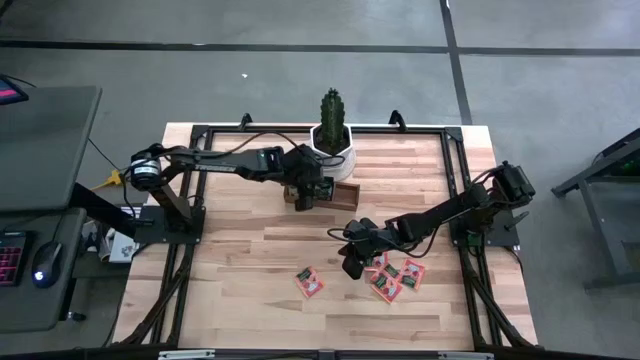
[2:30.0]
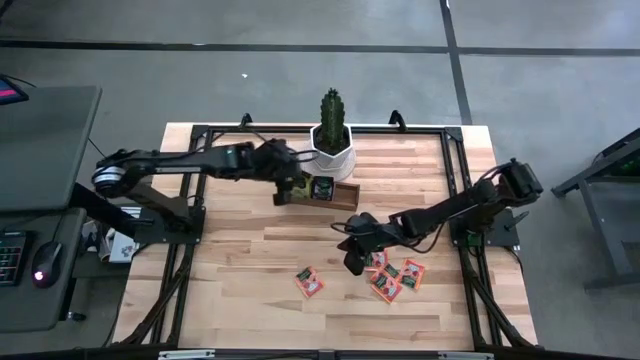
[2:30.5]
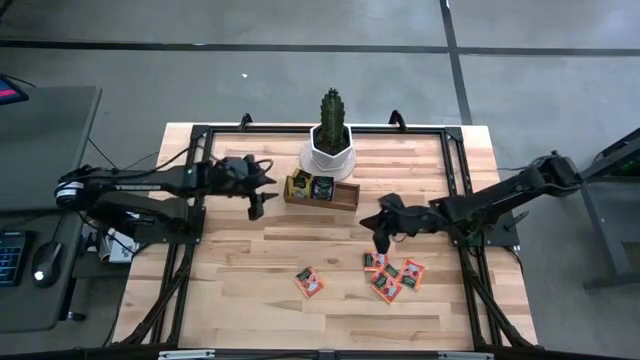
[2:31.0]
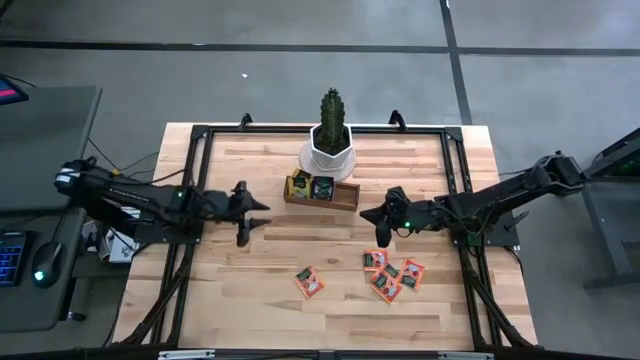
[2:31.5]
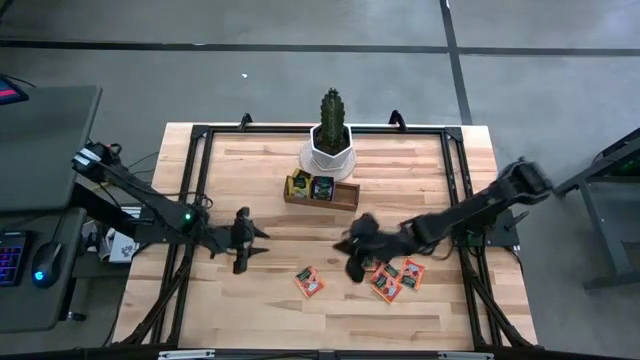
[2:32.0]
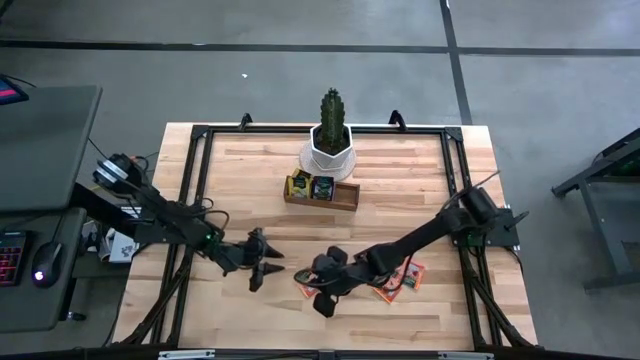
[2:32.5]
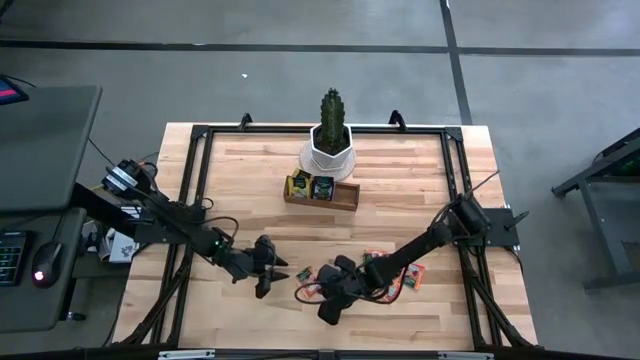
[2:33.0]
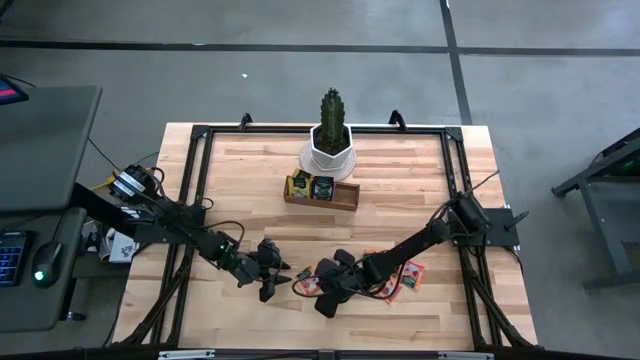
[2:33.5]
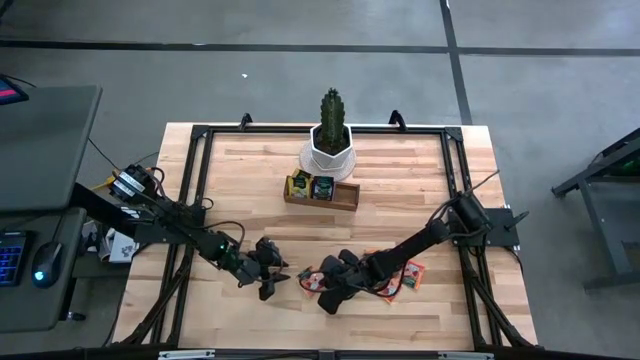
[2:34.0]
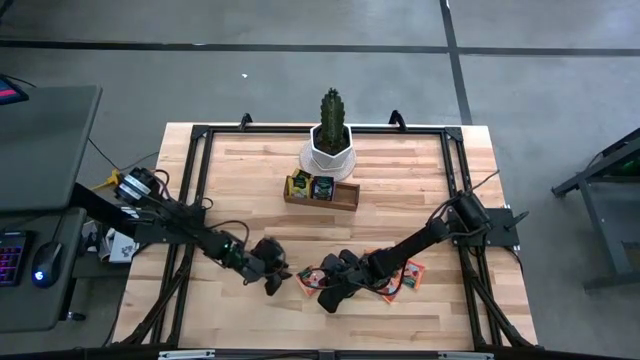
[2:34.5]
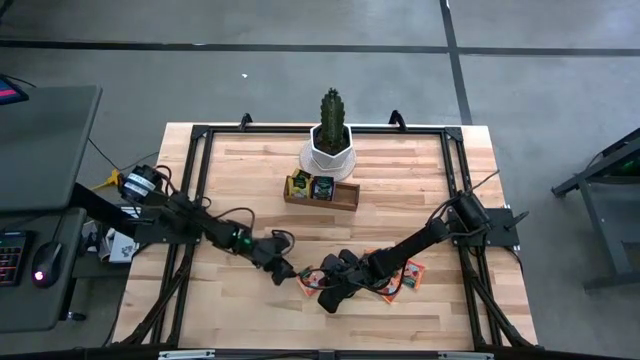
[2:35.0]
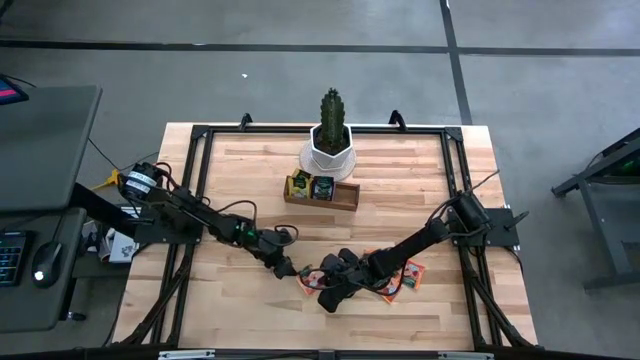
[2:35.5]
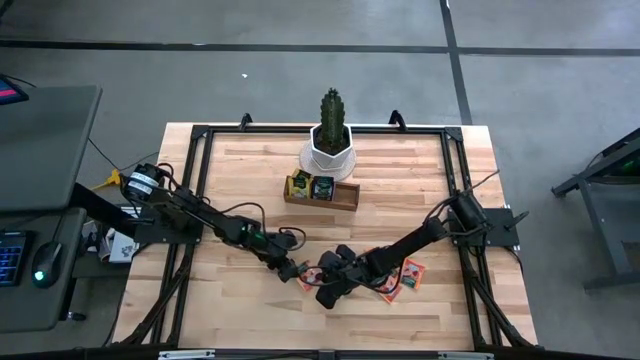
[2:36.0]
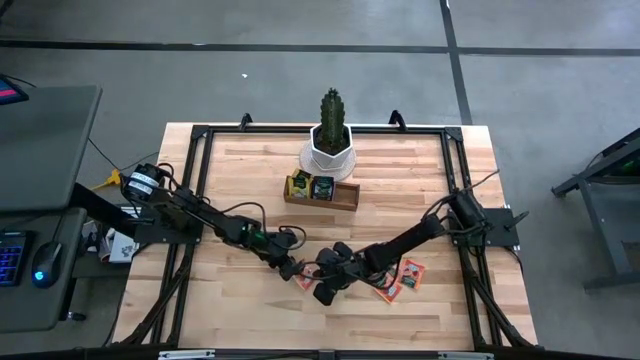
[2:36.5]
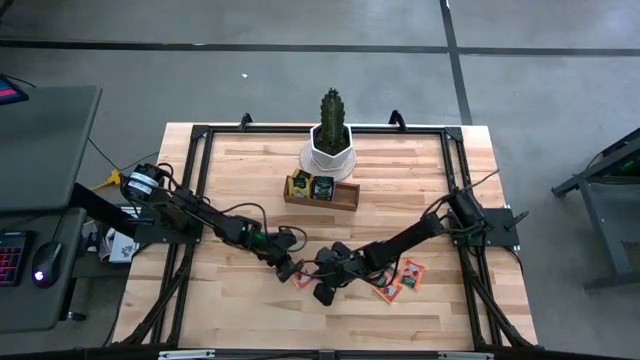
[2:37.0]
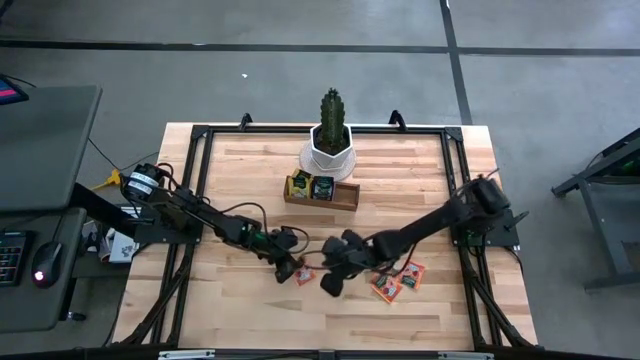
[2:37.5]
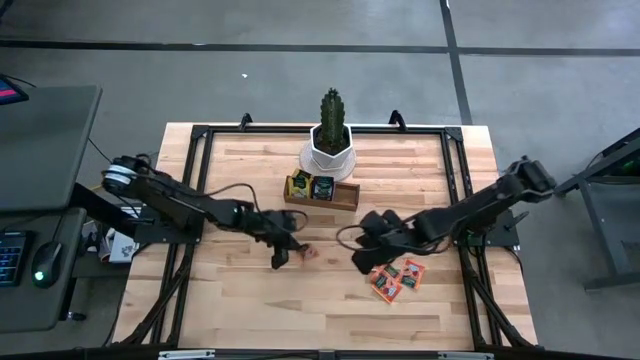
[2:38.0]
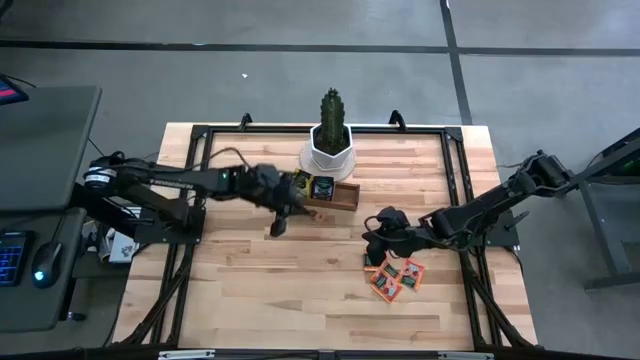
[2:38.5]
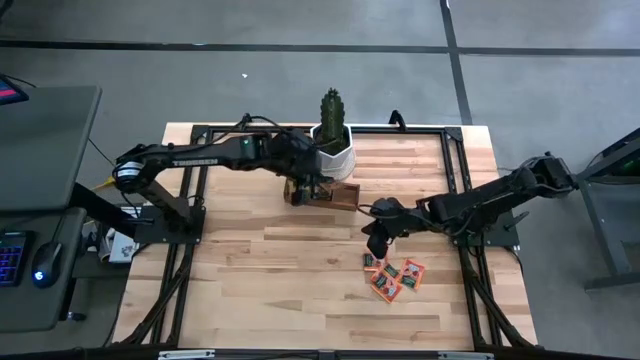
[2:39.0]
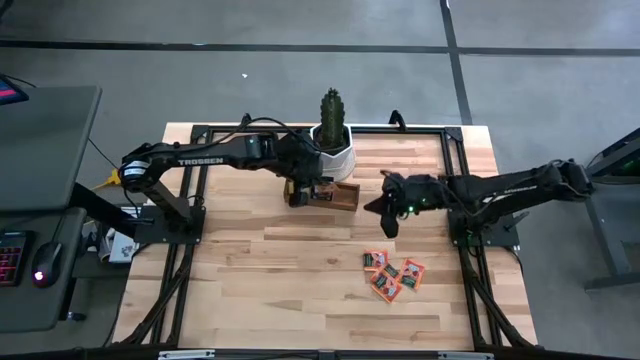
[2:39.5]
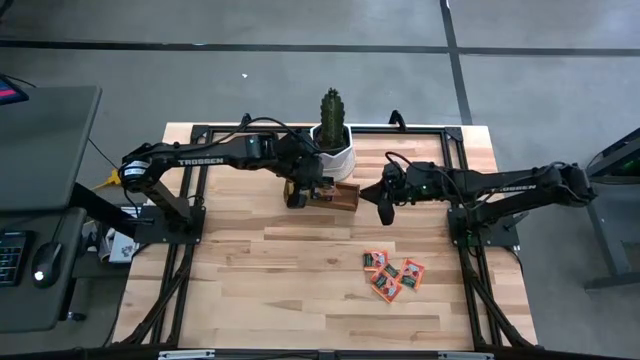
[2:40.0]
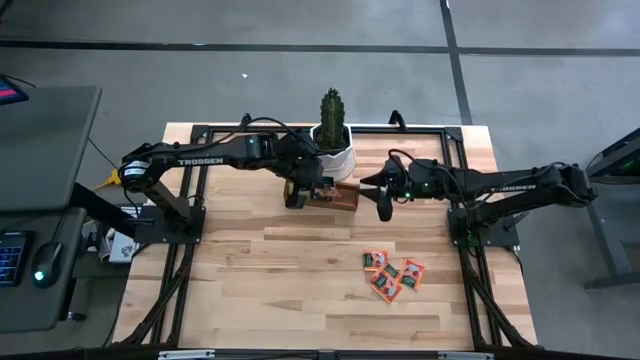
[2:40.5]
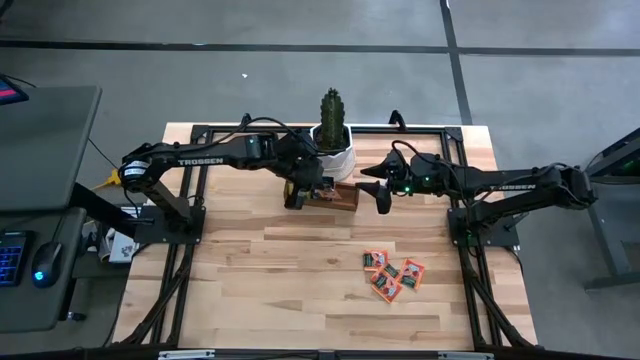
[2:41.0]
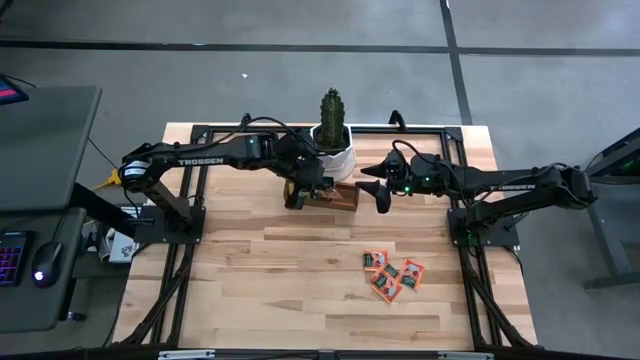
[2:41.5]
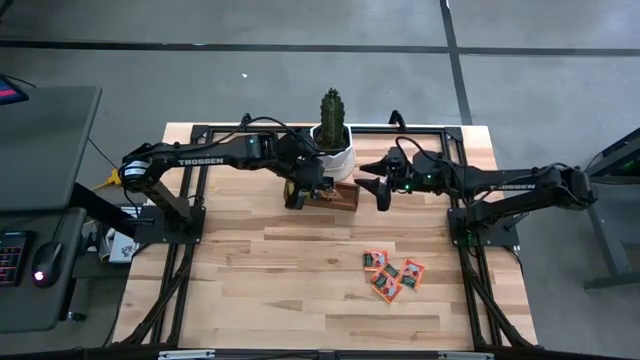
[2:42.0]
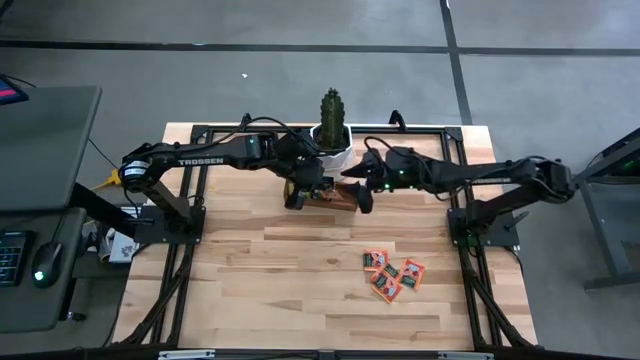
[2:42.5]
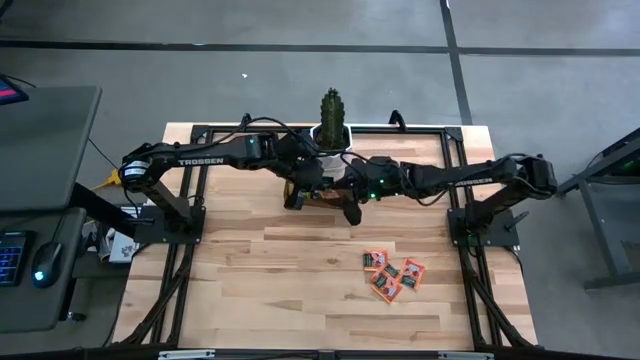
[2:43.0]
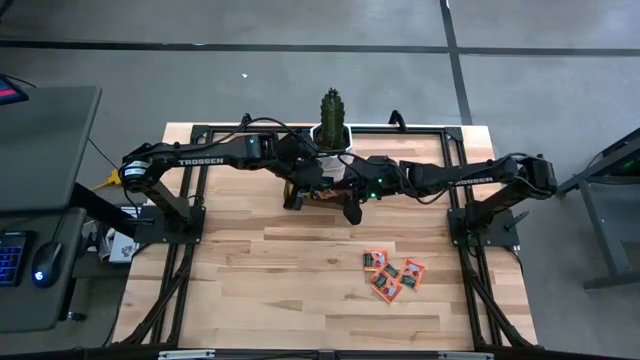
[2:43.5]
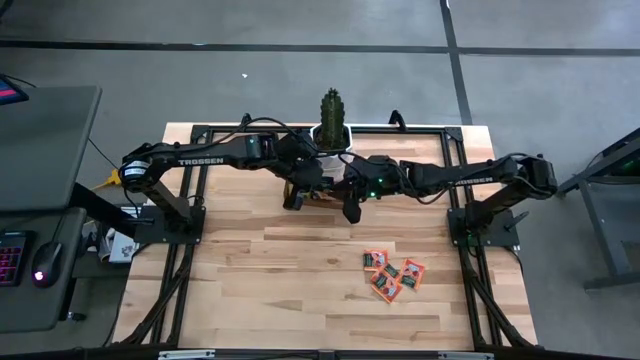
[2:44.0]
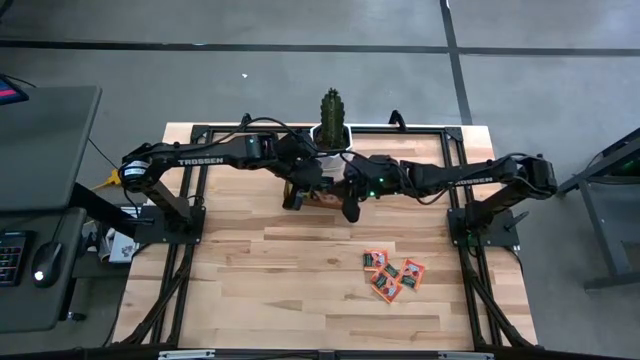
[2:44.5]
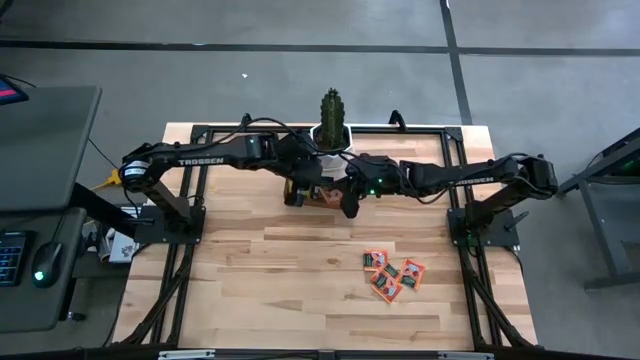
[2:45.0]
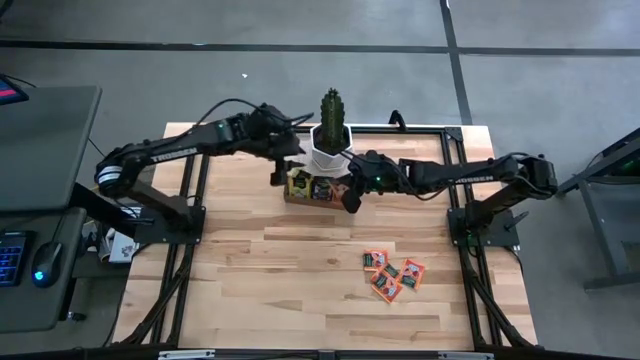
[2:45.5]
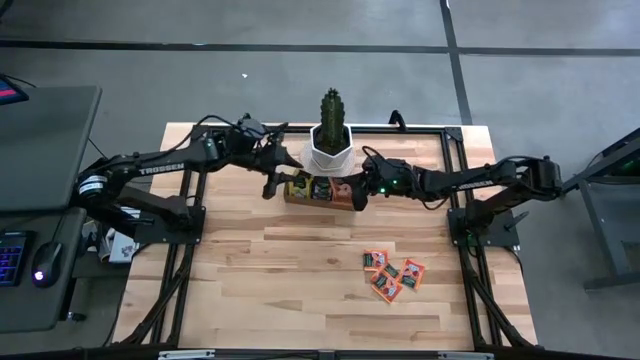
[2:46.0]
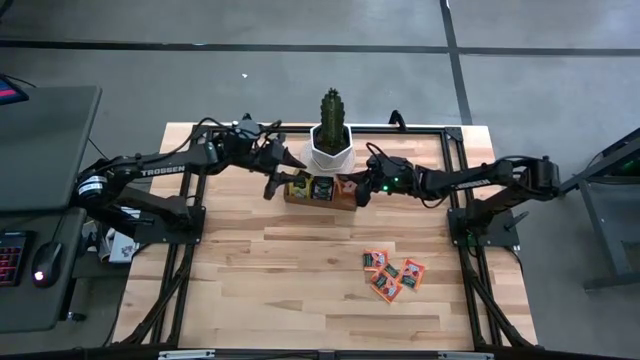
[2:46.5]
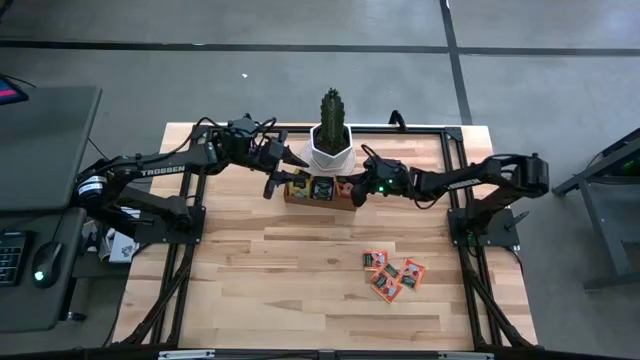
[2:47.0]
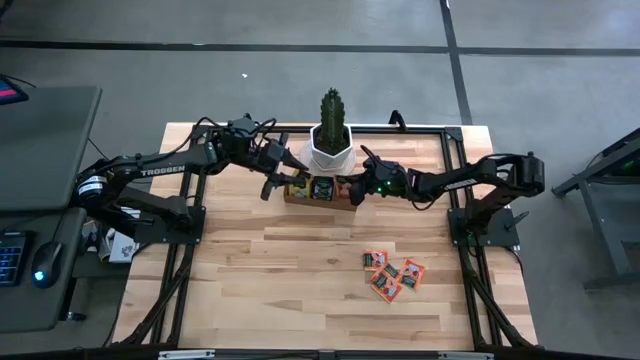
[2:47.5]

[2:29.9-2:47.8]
Task: Pick & Place Tea
Put the orange tea bag into the right section of the wooden organizer

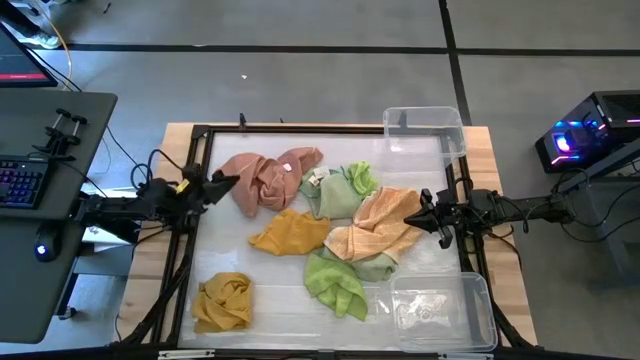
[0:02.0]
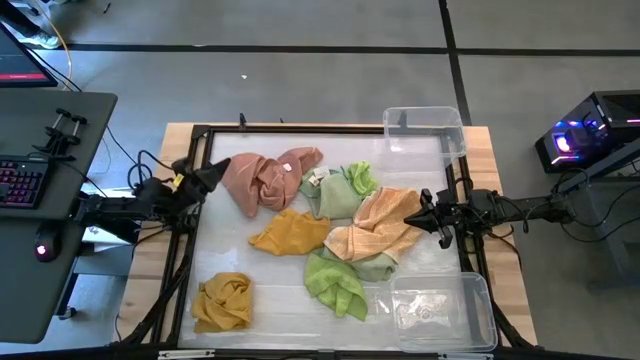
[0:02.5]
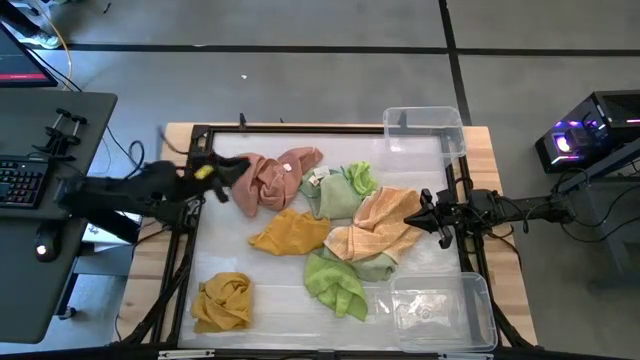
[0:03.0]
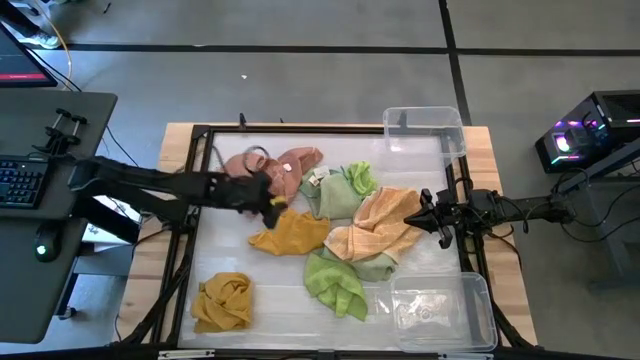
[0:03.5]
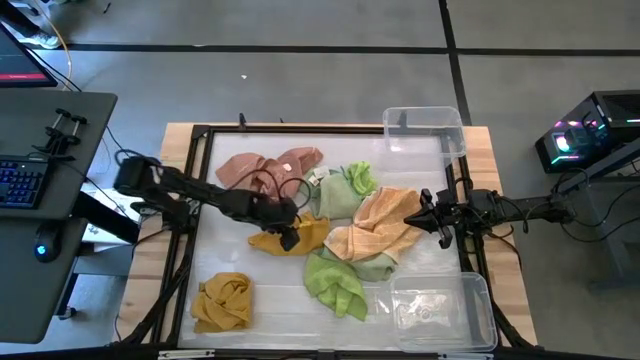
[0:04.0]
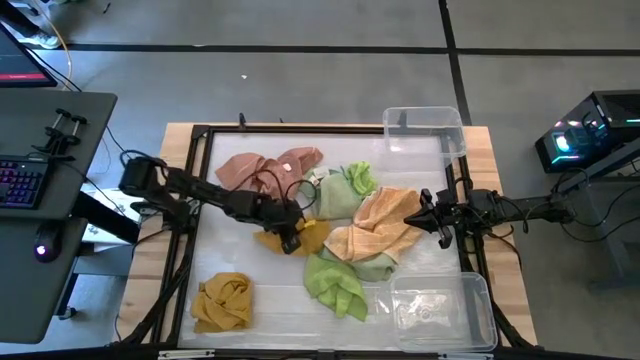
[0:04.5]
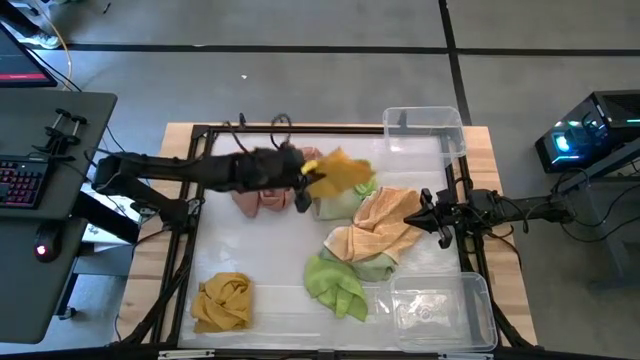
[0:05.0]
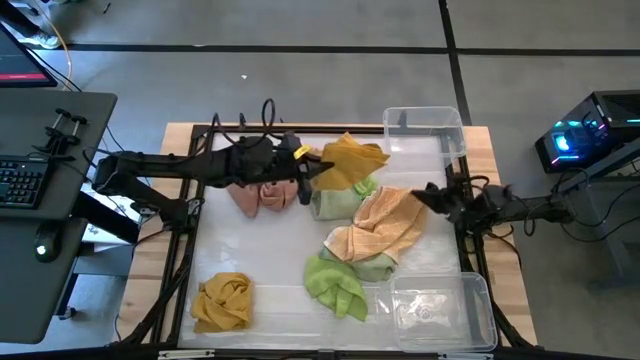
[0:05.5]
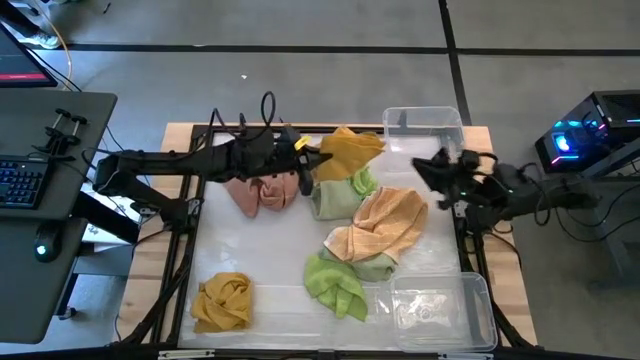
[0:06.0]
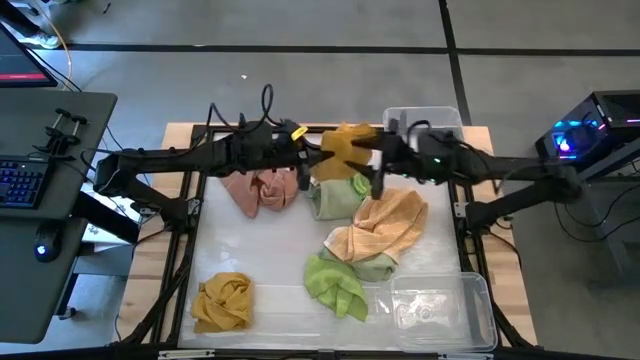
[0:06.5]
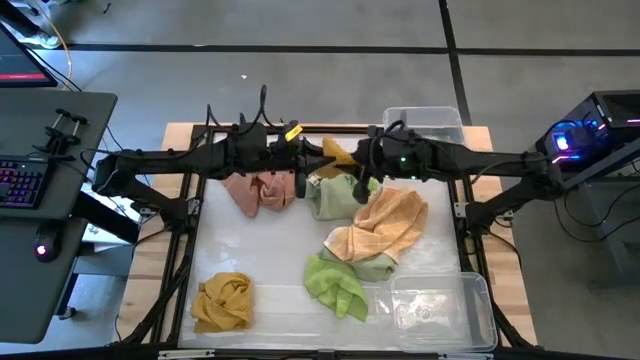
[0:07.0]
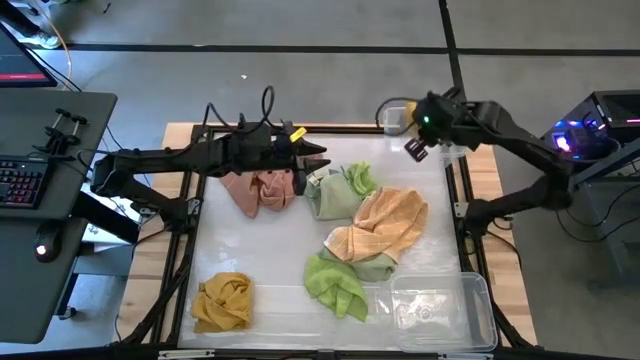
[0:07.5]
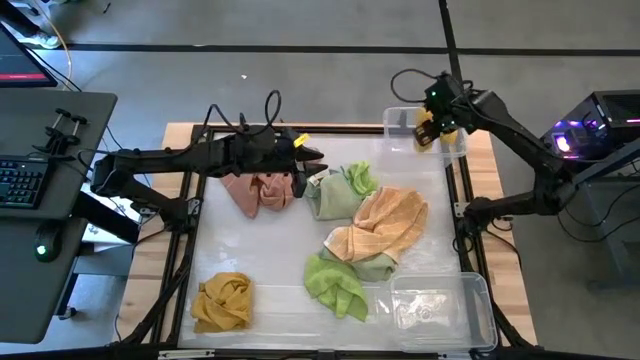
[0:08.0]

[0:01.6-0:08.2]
Task: Sort towels by color in basket
Put the top yellow towel into the top transparent bin
